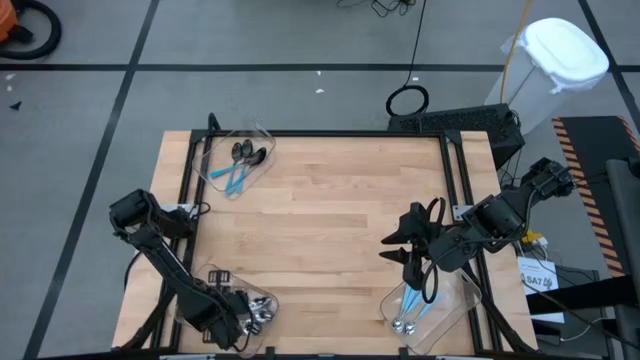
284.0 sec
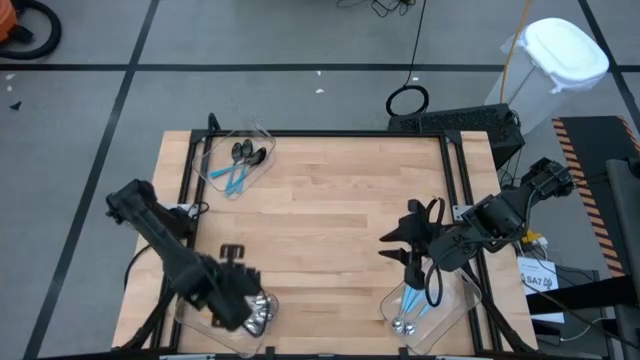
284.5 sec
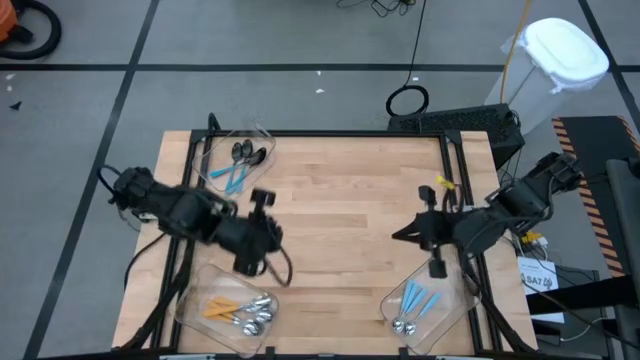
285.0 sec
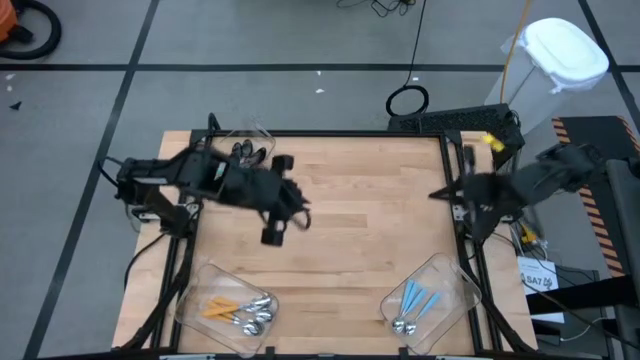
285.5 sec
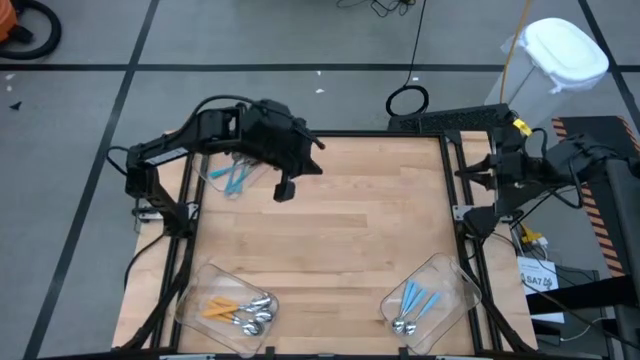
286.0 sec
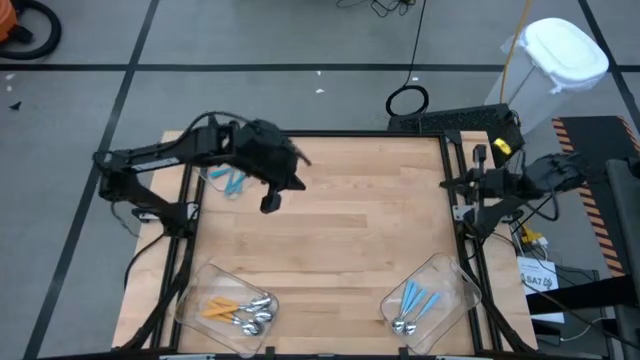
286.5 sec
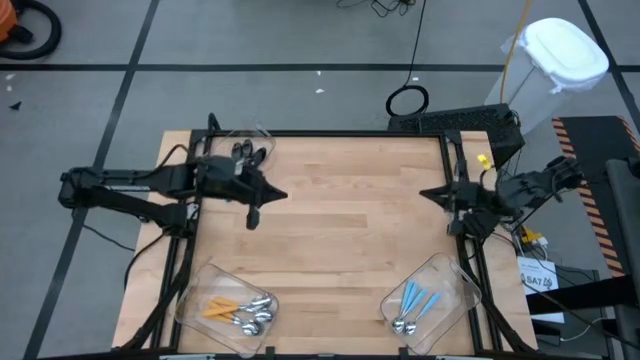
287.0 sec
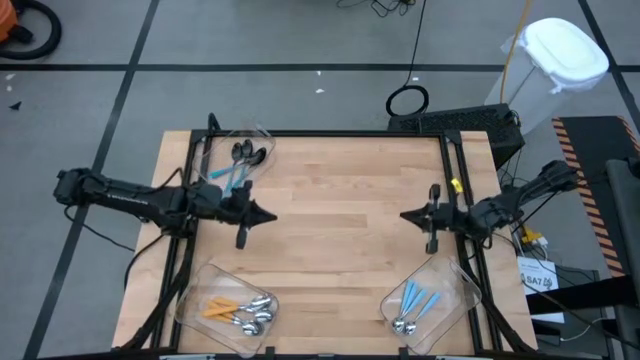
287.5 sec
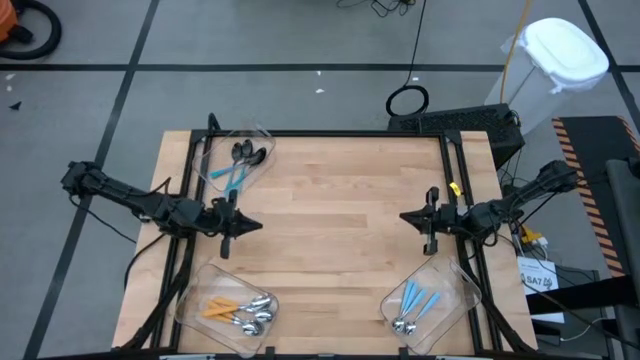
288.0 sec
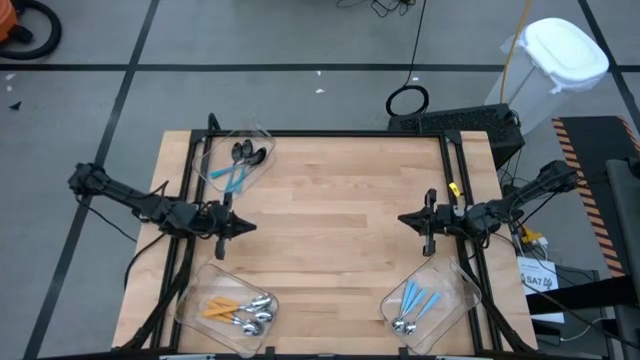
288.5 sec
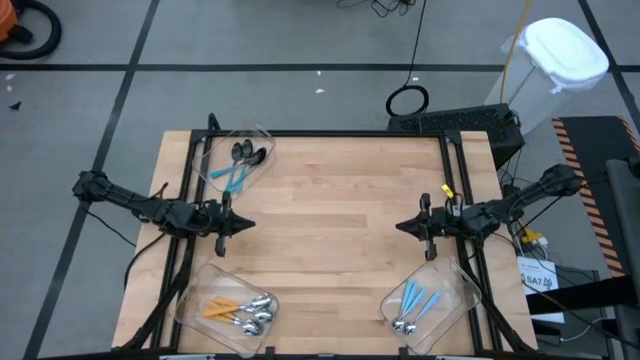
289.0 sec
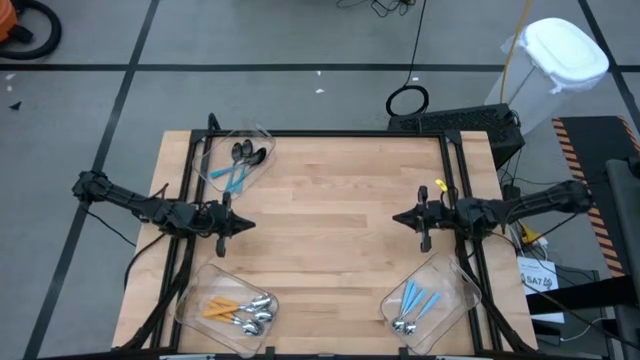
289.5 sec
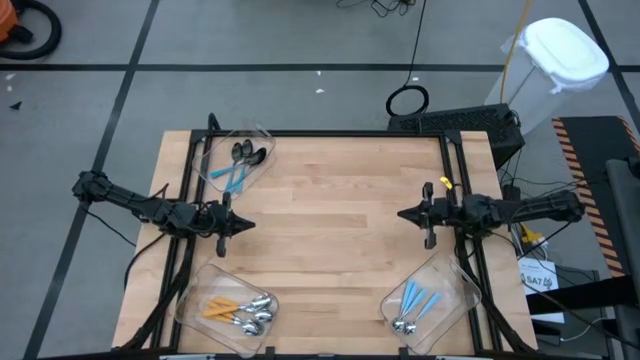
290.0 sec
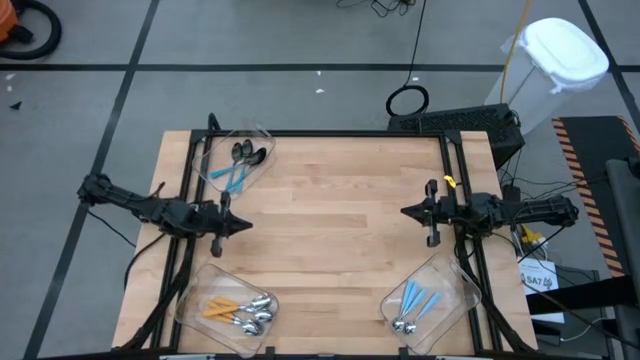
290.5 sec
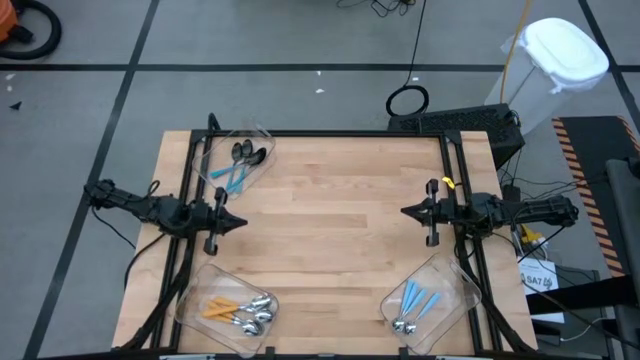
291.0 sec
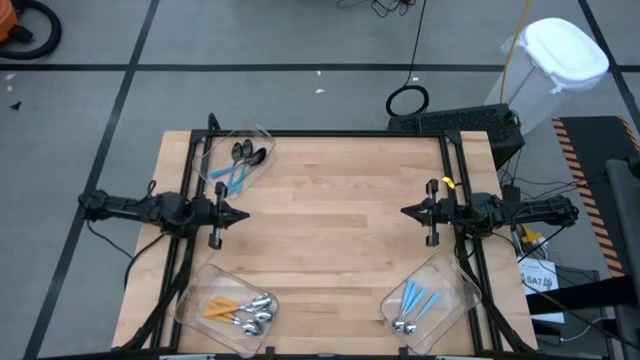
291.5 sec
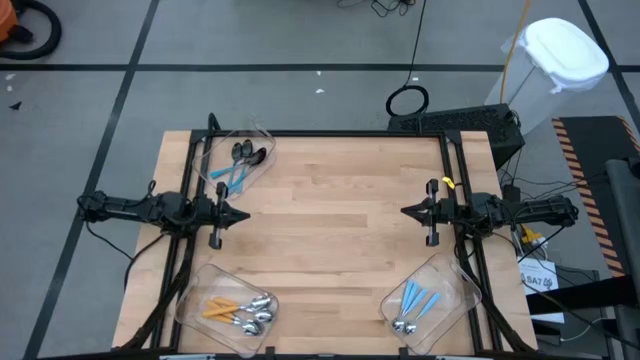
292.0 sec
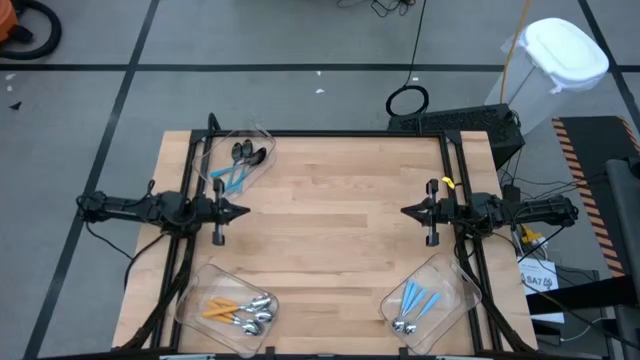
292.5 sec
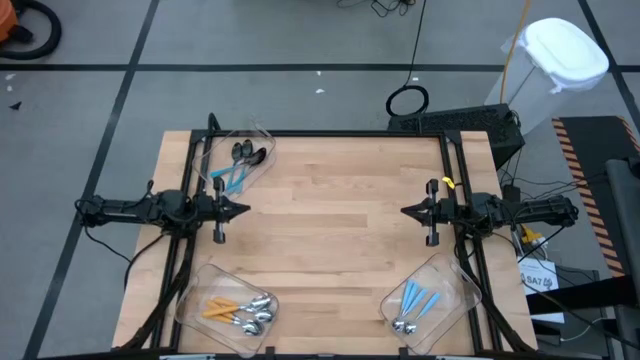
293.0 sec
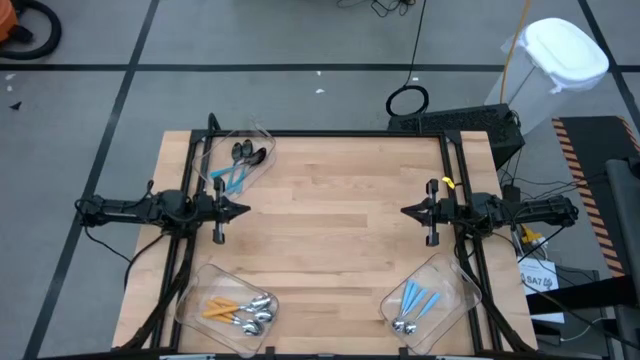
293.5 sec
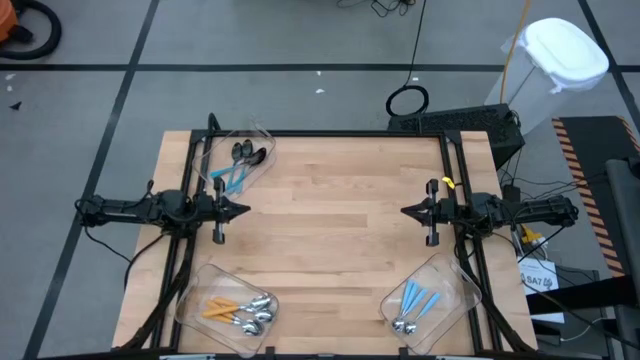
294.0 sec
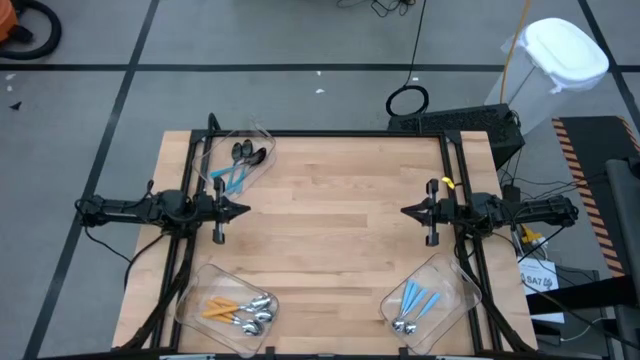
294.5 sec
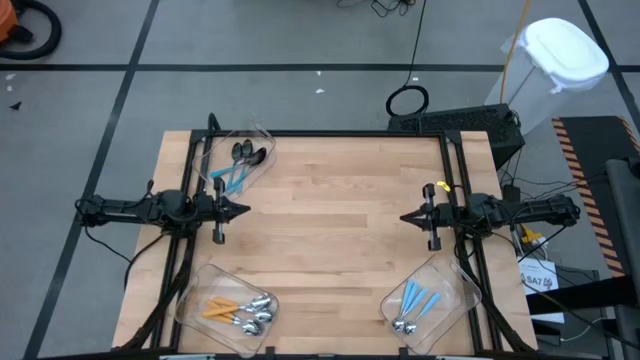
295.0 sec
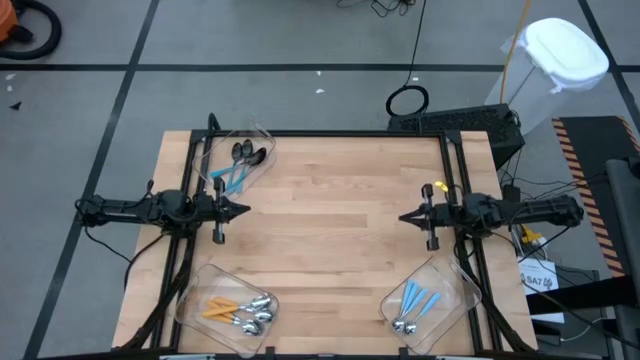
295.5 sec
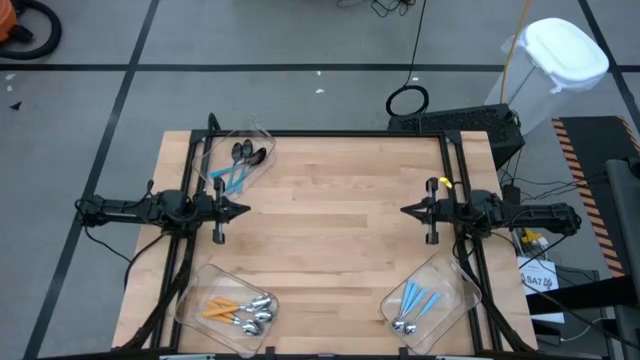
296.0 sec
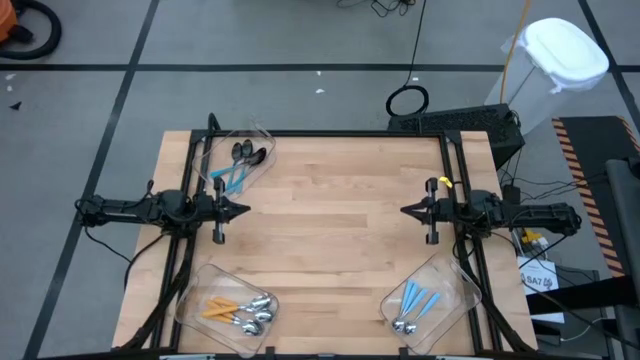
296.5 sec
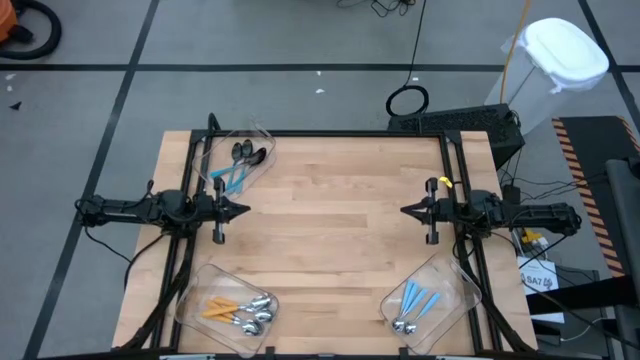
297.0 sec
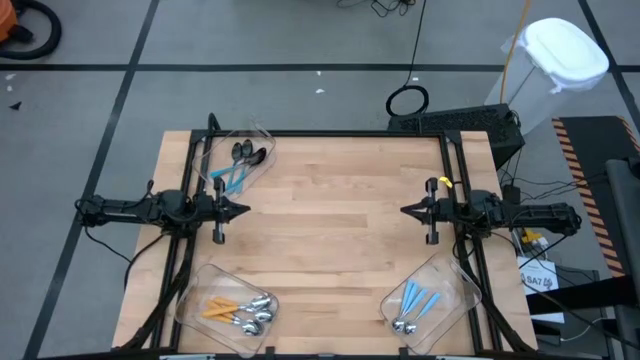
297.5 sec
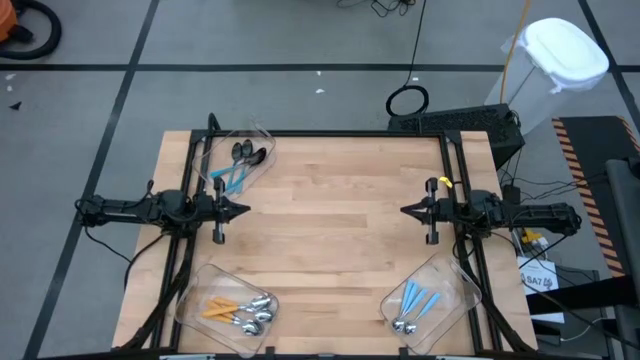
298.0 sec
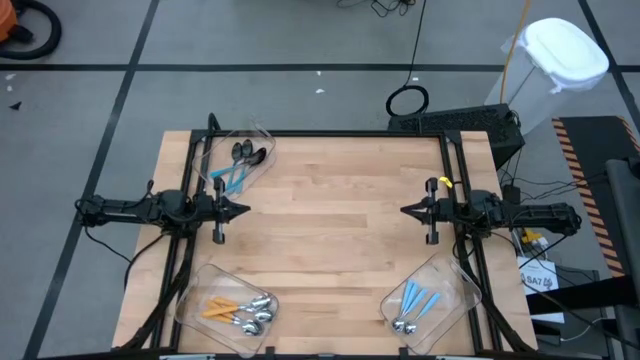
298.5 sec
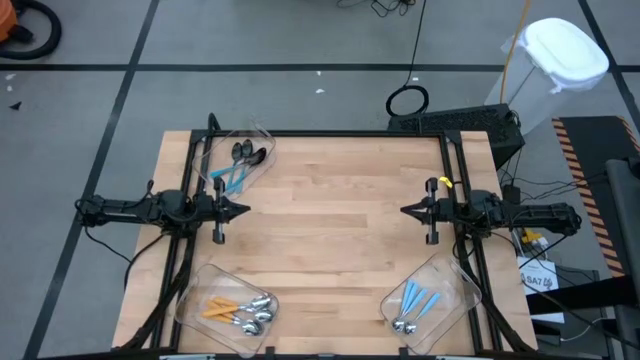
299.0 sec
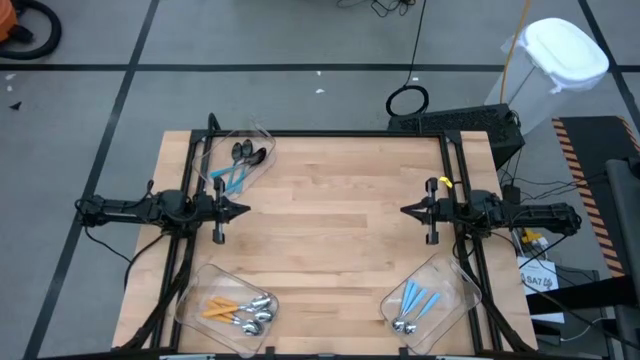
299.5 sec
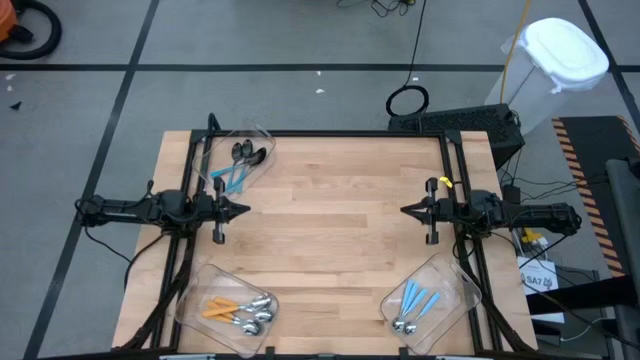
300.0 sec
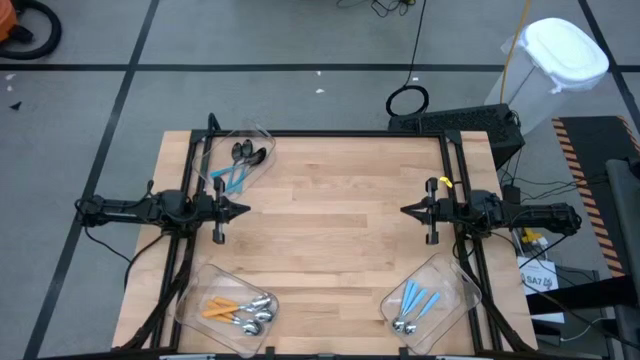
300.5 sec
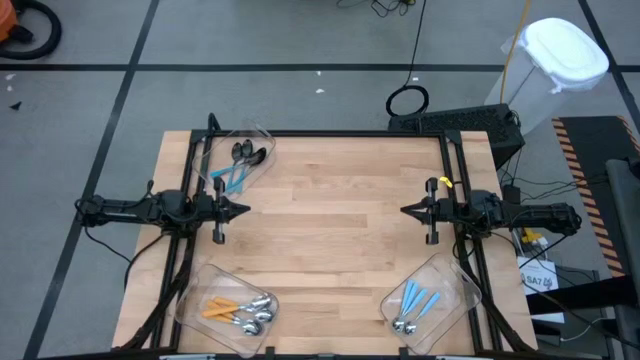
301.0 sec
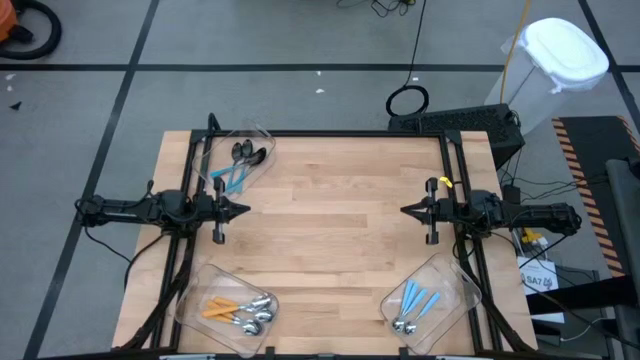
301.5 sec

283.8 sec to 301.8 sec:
Task: Sort silverware by color (type)
Return to Home Position

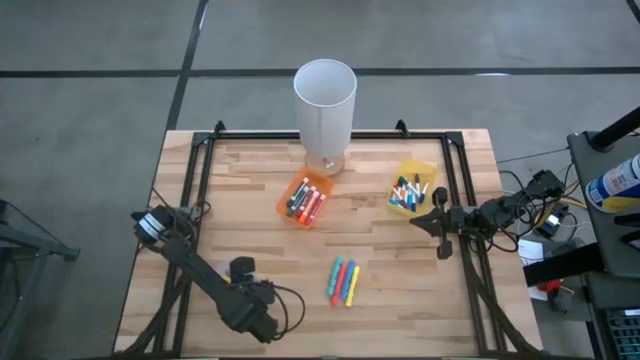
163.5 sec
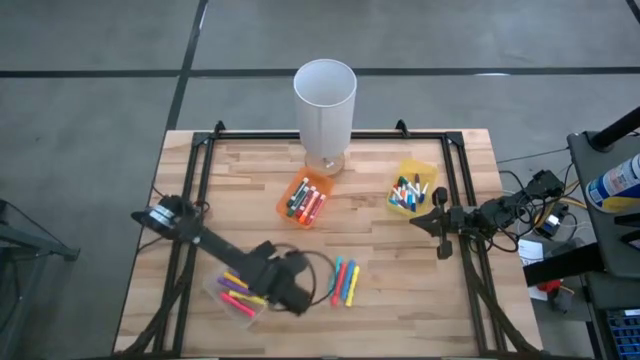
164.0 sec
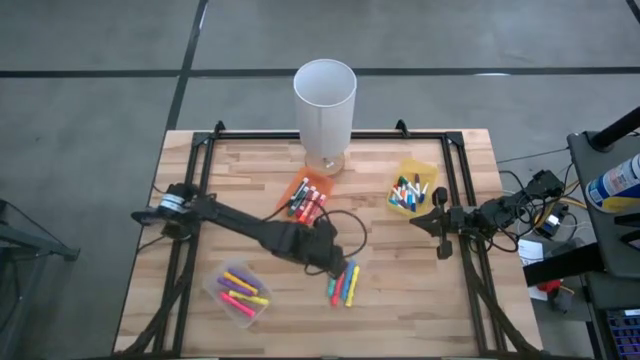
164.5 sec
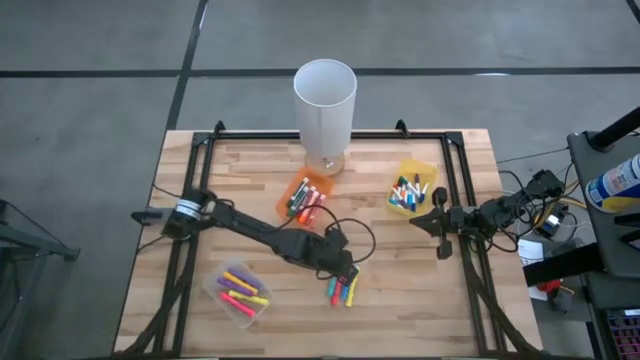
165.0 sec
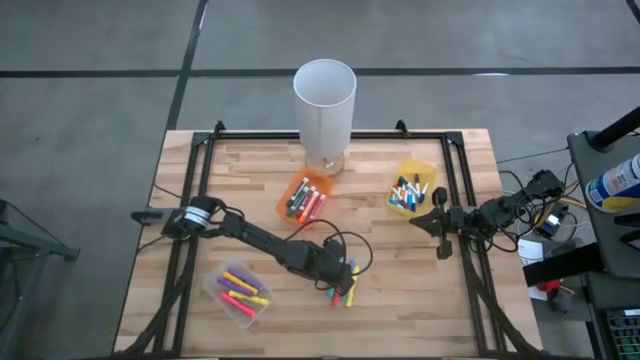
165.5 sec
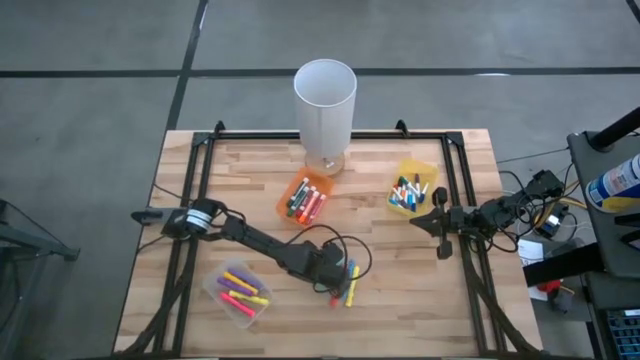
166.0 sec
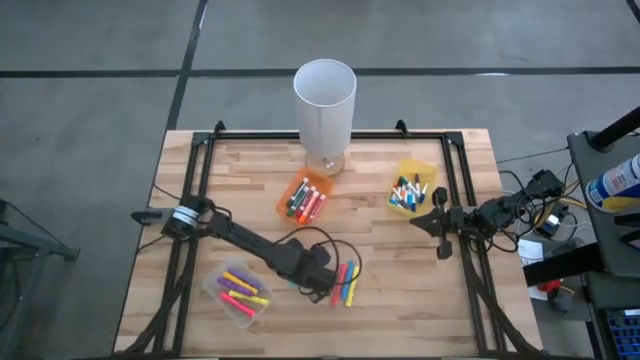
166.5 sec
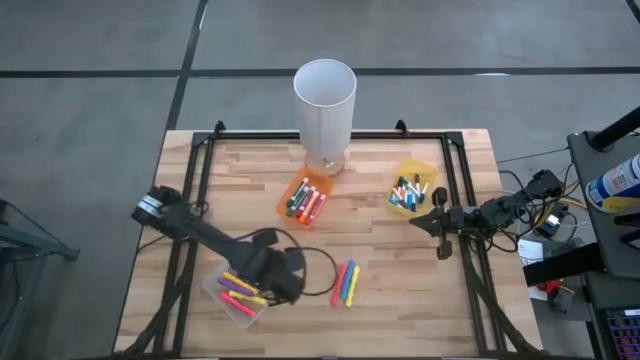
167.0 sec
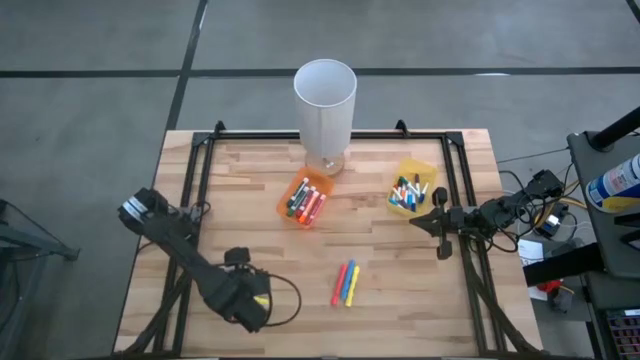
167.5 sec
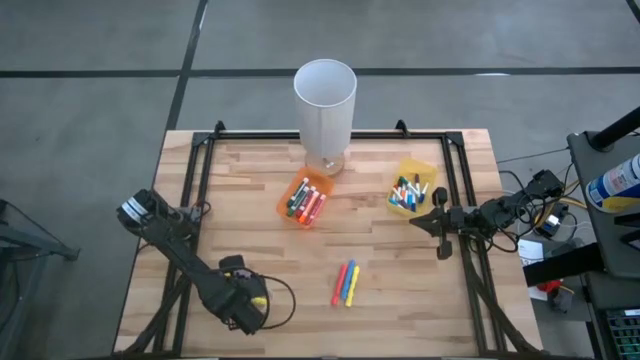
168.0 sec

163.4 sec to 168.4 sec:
Task: Pick & Place Markers
Put the light blue highlighter pen into the white bin
